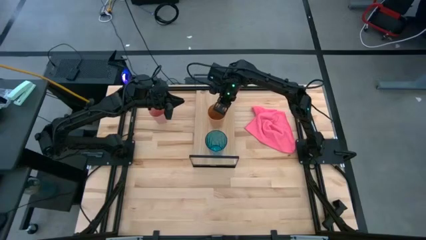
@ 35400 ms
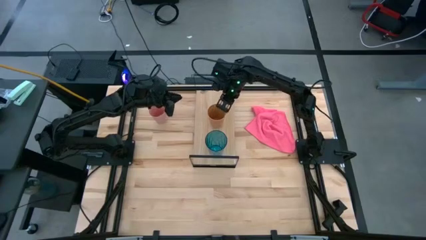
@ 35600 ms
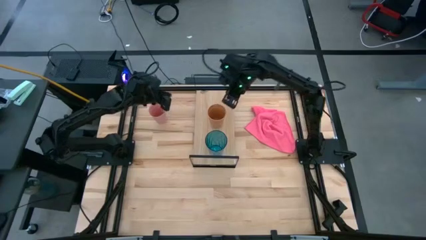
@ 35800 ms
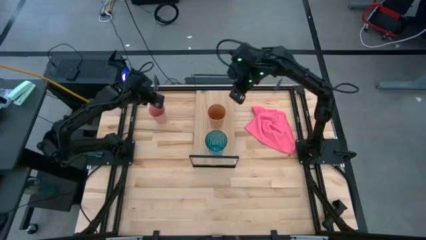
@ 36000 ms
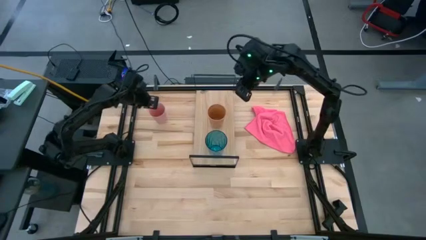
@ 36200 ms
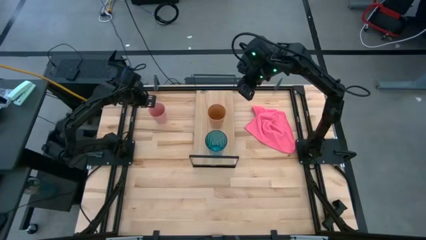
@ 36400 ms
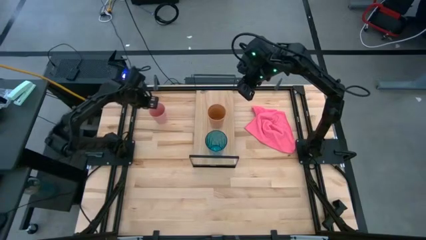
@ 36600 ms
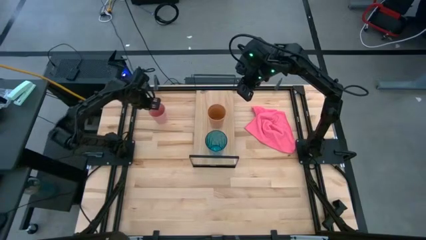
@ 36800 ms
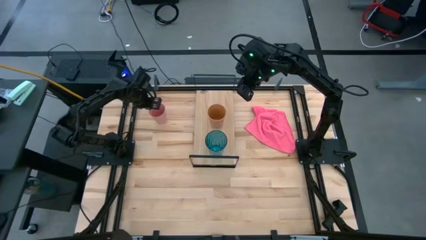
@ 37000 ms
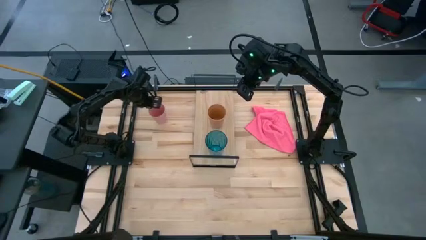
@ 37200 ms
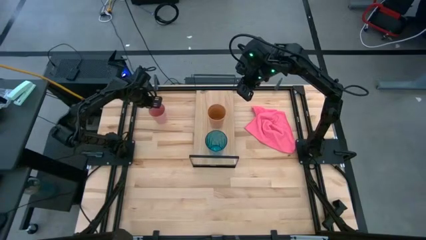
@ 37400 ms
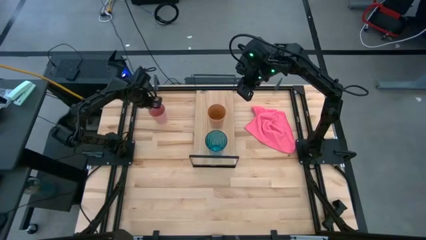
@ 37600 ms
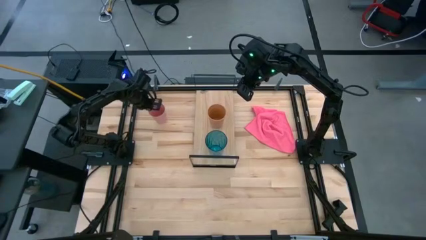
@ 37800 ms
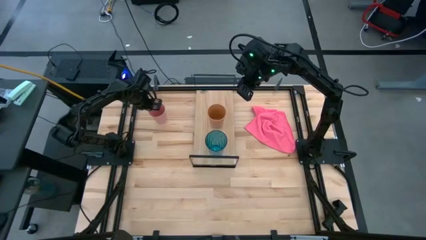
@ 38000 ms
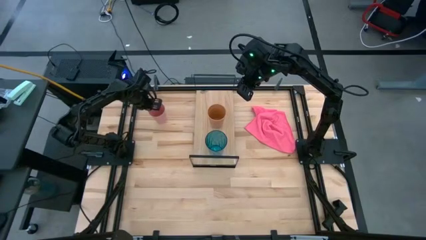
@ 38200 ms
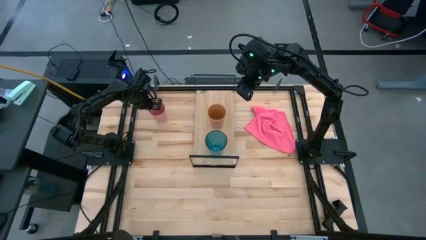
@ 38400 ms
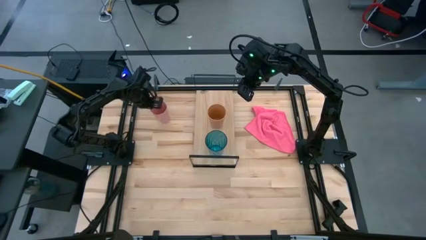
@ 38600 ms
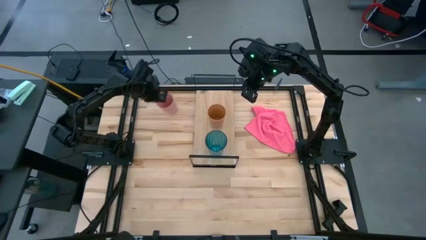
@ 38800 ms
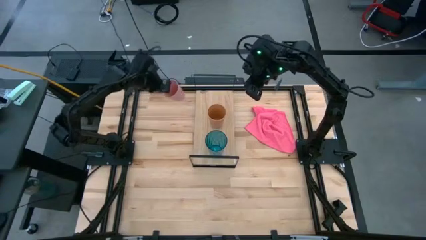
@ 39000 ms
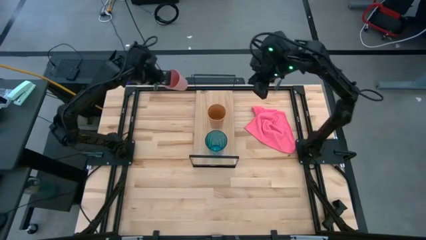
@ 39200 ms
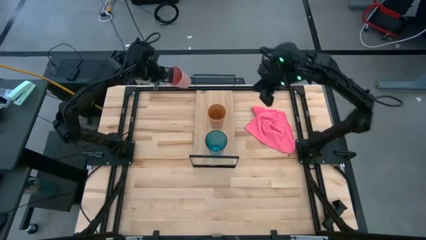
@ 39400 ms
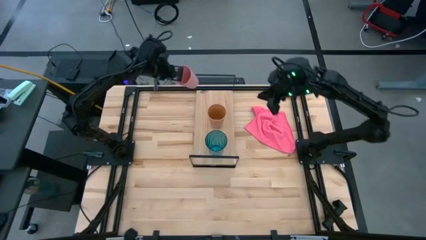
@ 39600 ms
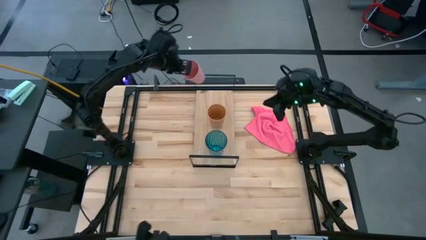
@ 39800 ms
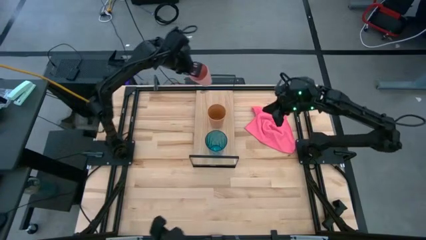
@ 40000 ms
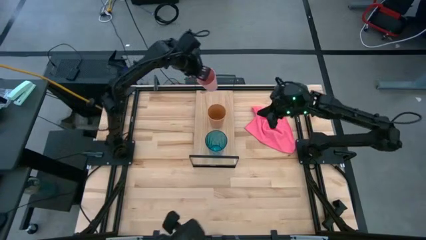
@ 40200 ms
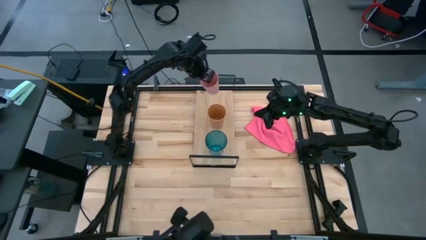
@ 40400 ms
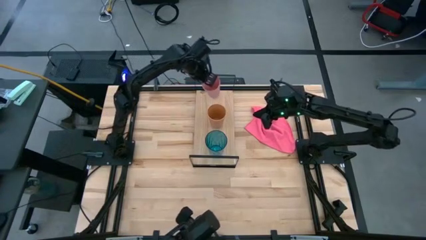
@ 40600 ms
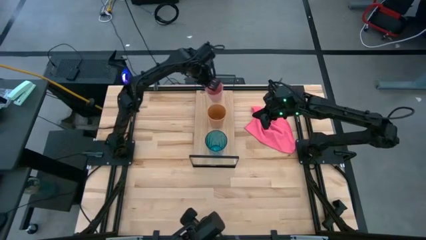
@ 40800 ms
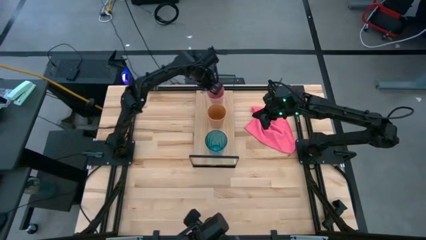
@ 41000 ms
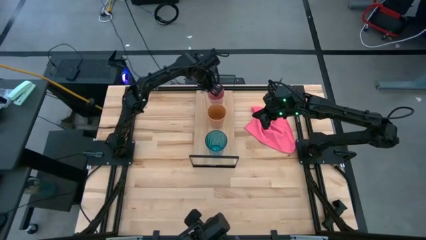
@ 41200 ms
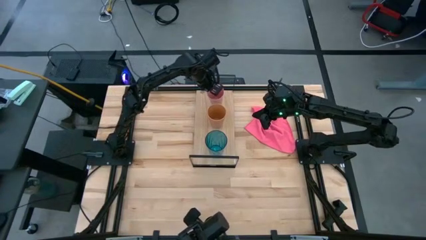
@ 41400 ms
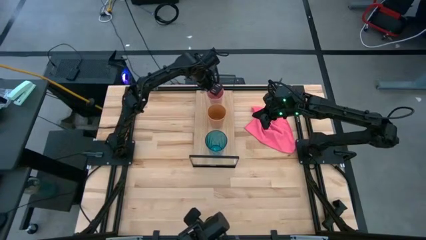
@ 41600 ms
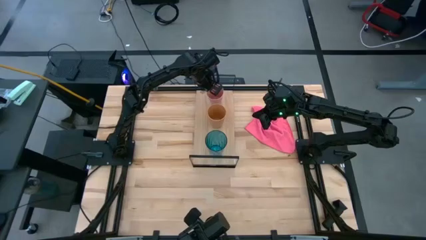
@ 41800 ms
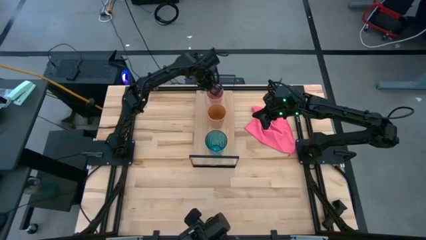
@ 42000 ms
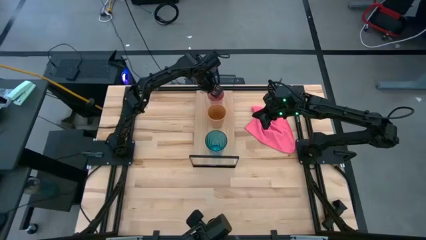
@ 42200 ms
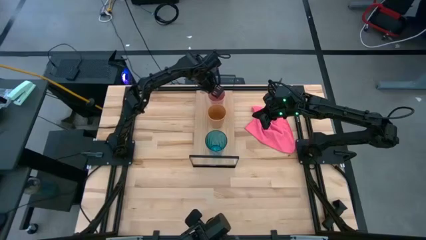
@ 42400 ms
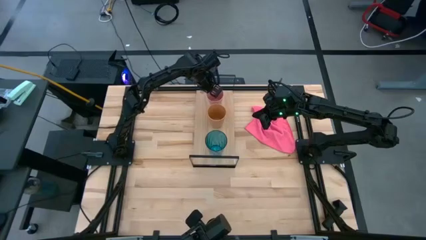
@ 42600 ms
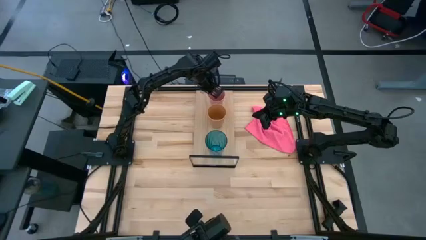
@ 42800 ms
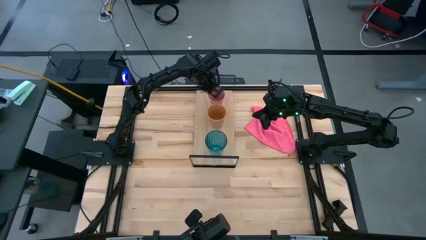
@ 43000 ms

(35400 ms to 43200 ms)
Task: Stack small to large cups/mugs on shelf
Put the pink cup on the shelf

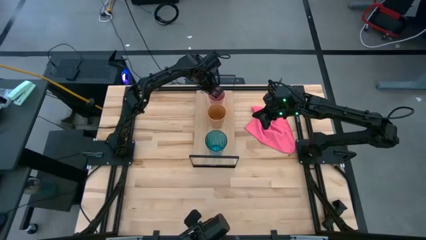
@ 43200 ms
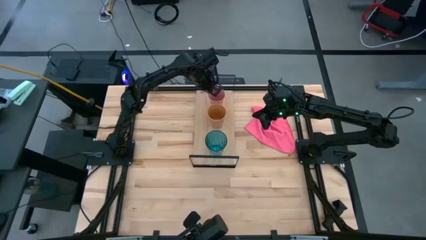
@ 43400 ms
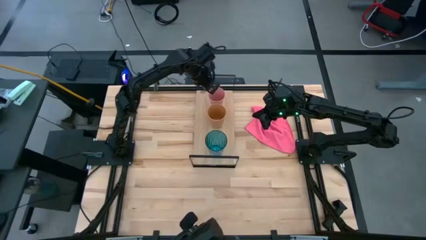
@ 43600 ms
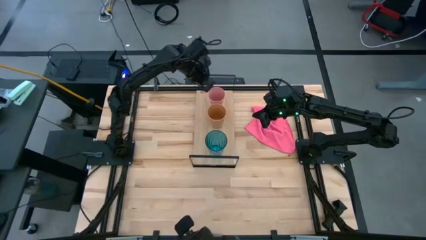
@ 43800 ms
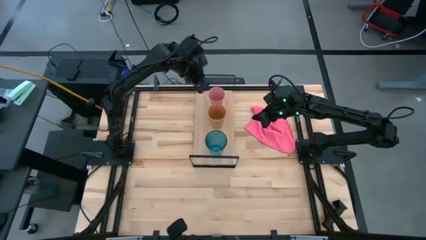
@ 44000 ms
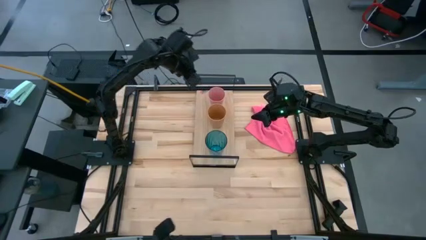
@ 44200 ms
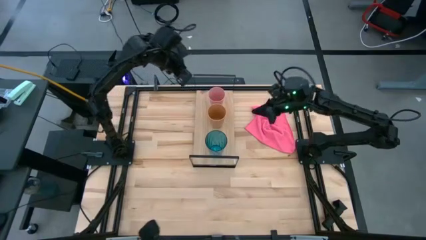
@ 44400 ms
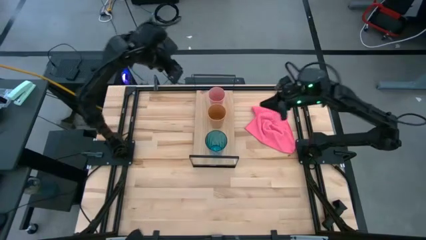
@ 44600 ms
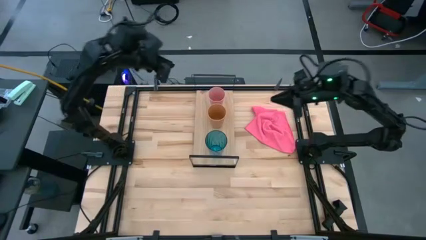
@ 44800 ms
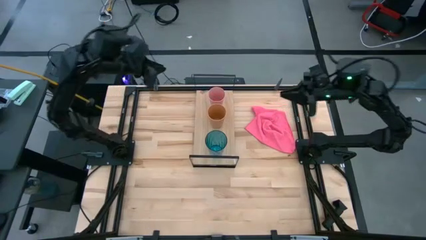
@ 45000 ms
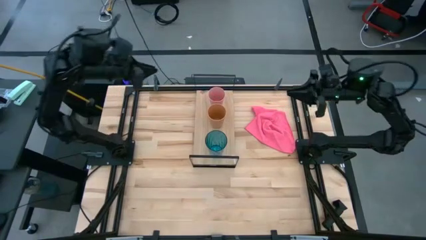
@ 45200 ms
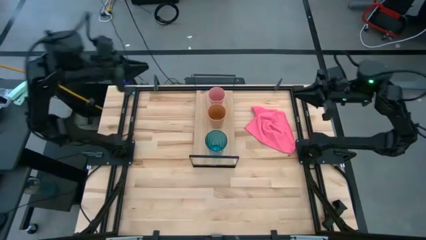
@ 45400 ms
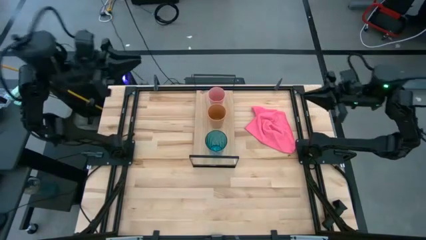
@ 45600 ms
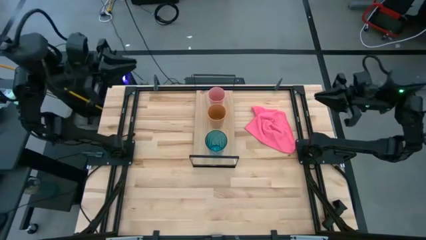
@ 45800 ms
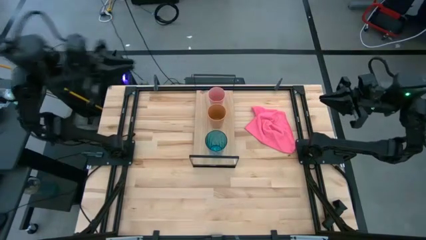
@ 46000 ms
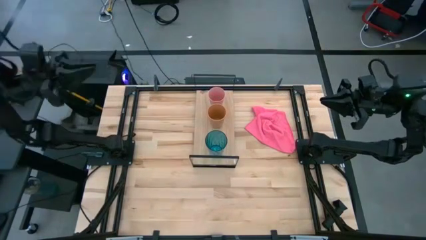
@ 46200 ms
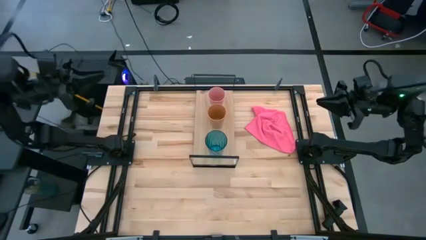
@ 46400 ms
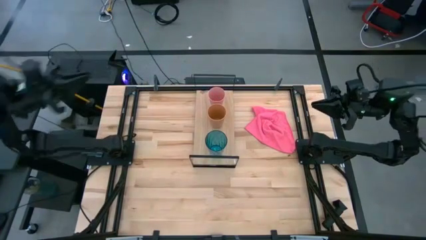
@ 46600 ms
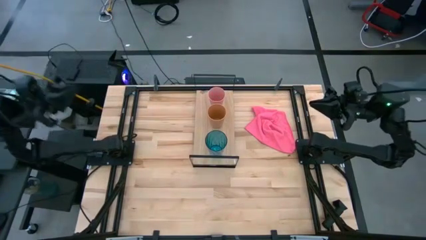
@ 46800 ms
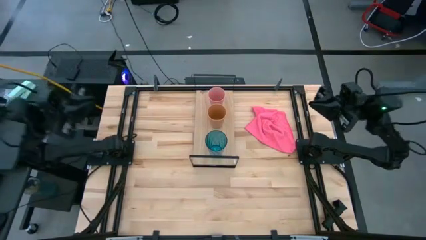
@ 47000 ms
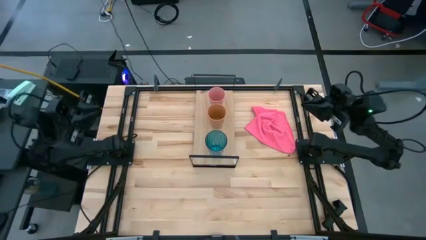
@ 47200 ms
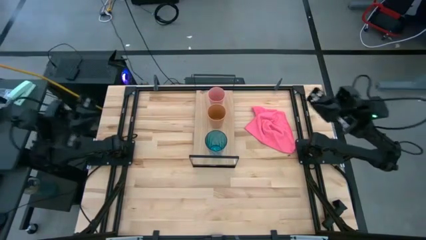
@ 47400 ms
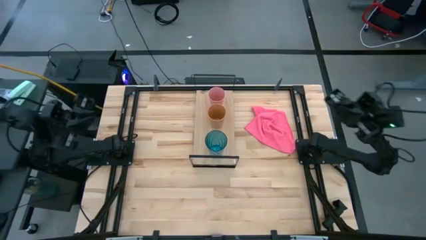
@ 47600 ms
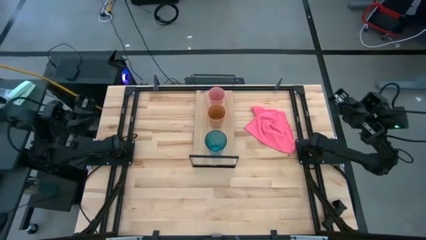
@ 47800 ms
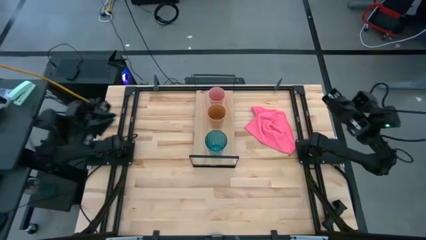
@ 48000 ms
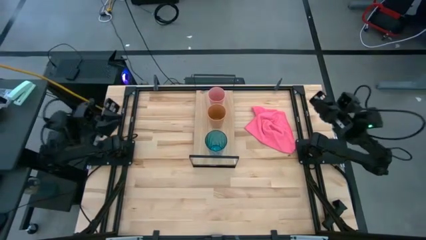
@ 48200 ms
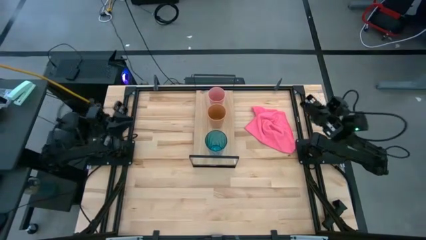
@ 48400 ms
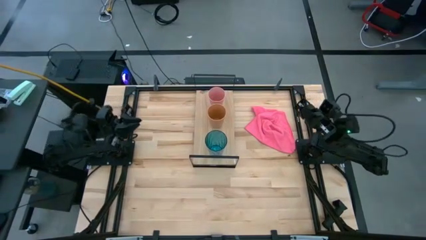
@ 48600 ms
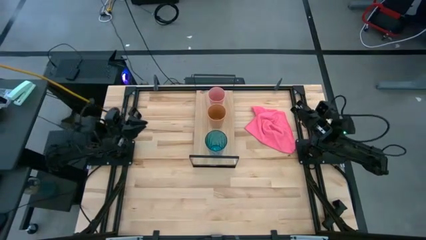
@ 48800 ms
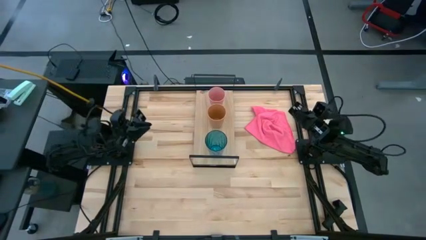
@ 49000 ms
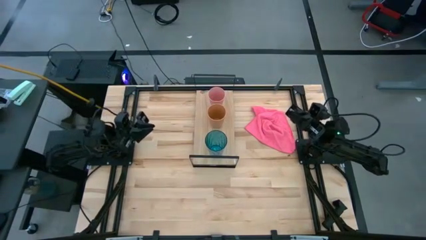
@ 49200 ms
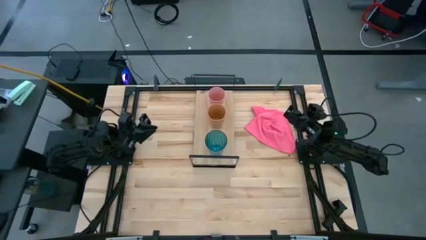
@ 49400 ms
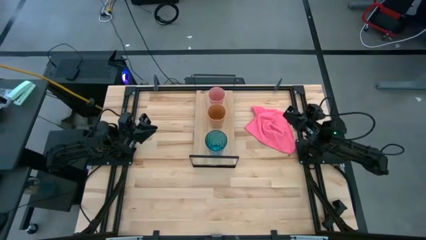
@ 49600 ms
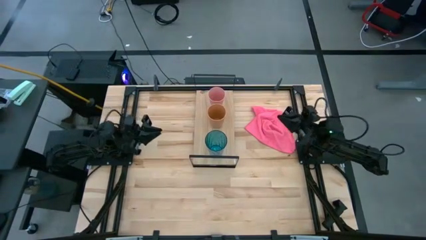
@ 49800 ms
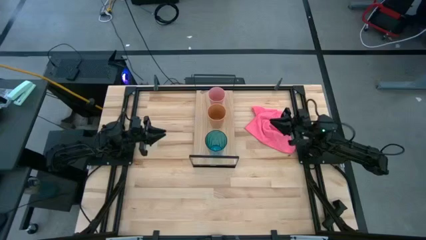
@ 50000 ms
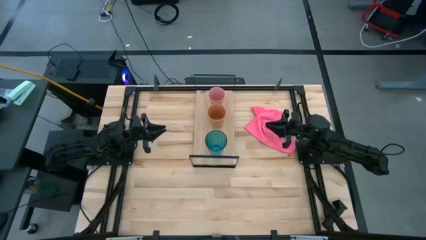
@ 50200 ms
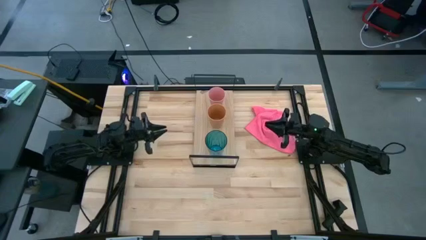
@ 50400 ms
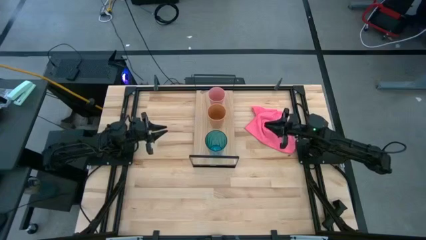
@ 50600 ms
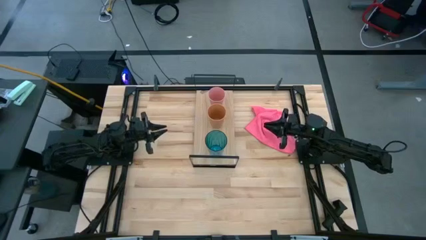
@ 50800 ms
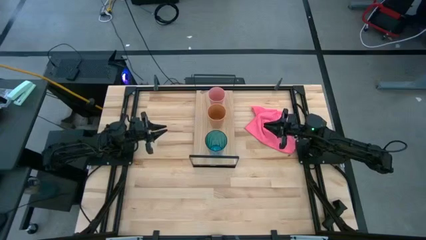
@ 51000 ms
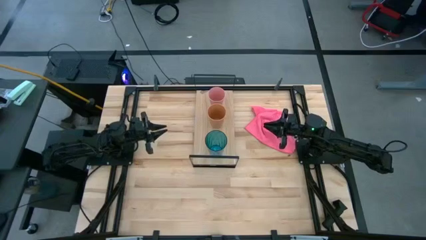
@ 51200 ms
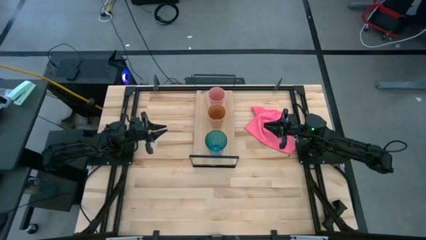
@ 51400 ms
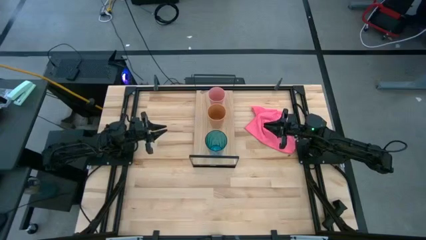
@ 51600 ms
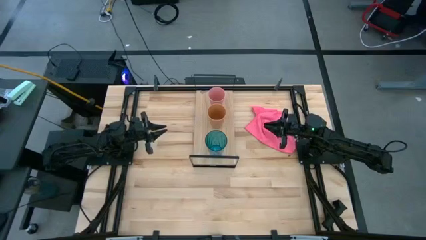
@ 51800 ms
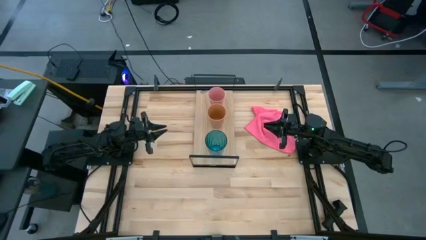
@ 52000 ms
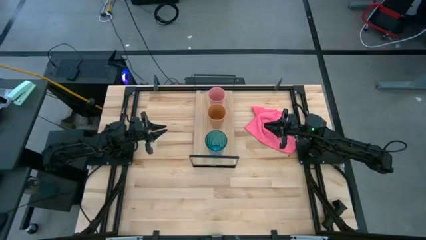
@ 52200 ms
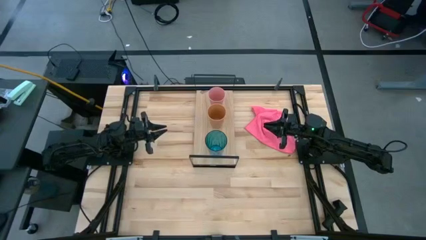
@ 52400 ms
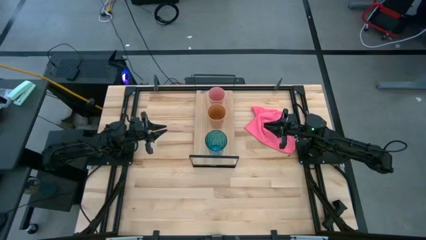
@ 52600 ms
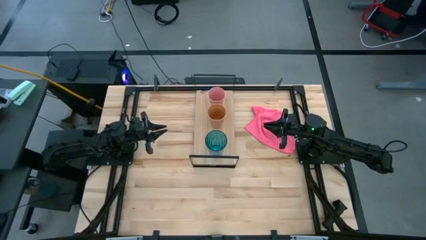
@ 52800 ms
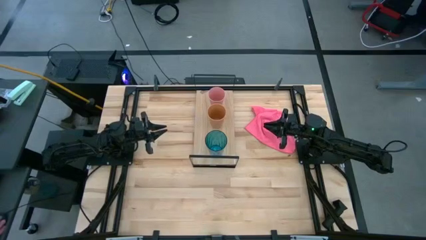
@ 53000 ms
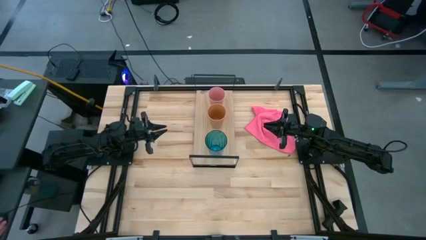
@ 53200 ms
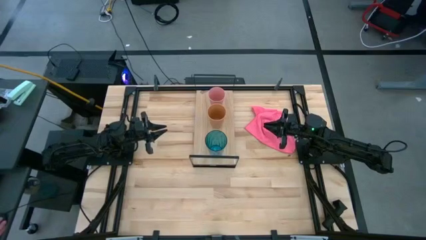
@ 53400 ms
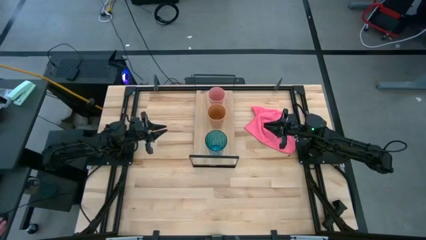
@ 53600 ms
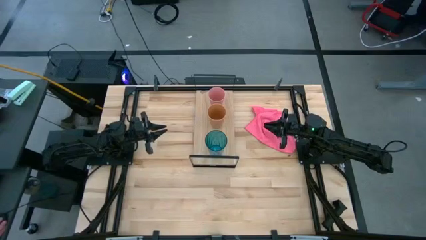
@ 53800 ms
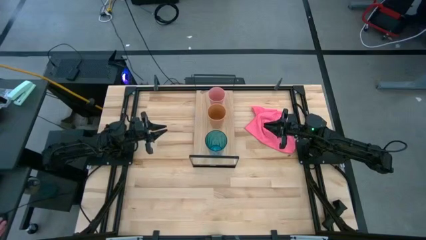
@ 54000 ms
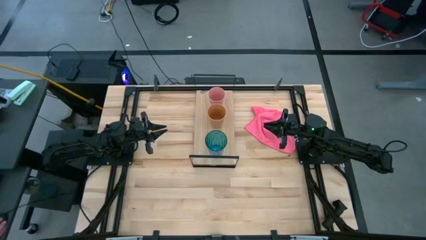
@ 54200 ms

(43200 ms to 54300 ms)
Return to Home Position
